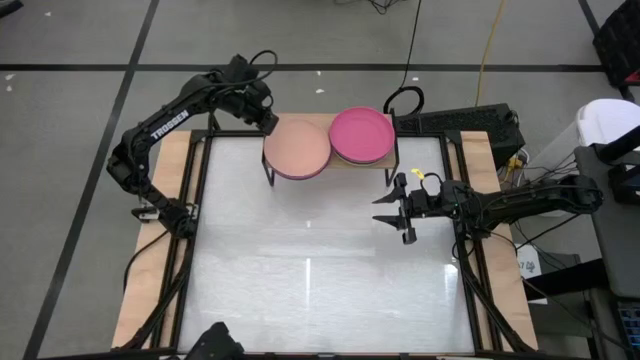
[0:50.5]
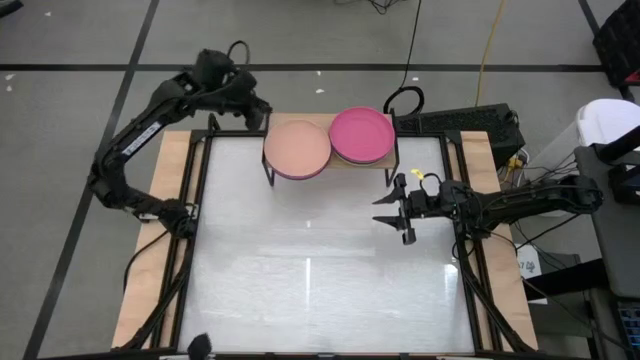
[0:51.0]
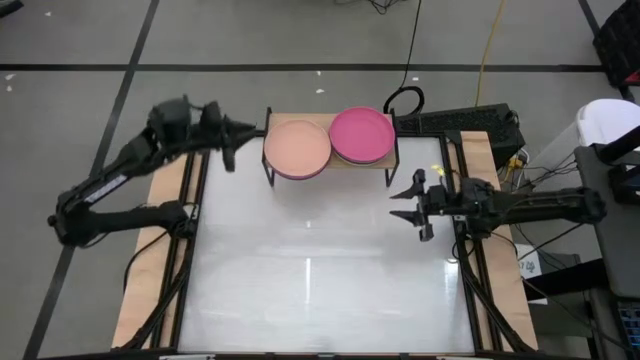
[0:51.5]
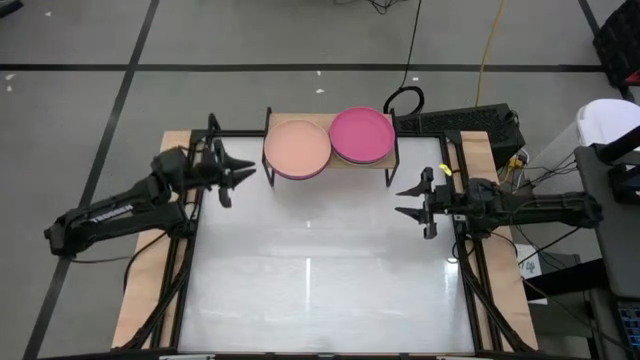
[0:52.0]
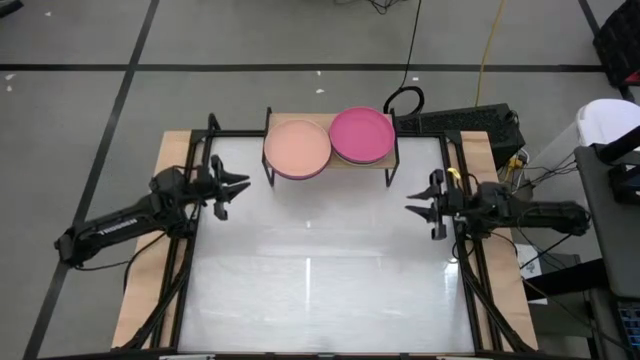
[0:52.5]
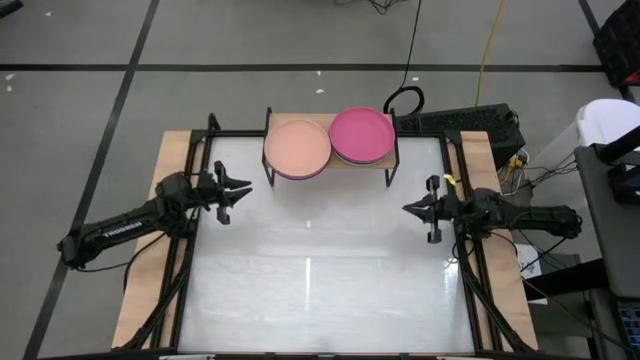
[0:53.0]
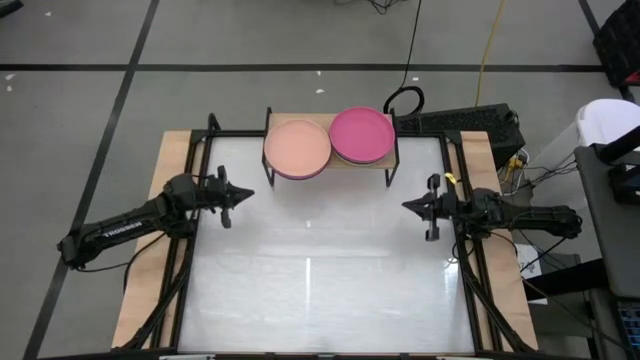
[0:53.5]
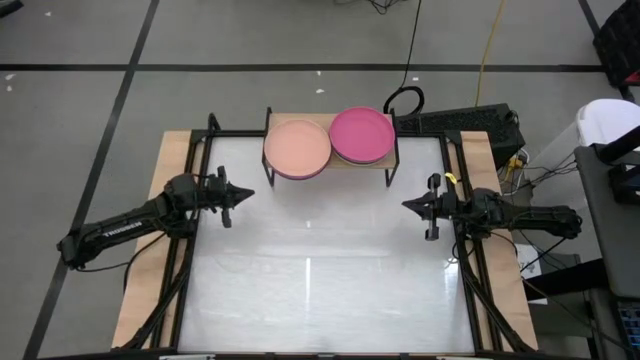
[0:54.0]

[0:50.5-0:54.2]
Task: Place and stack plates onto a shelf
Return to Home Position

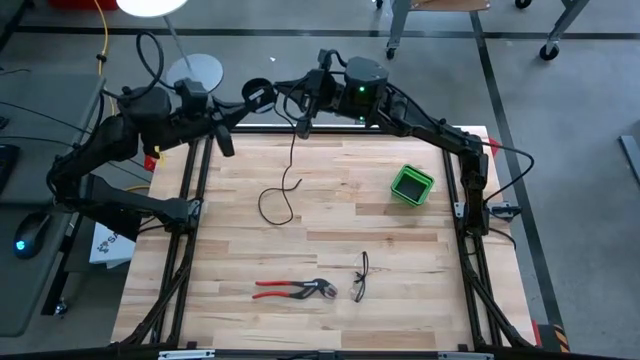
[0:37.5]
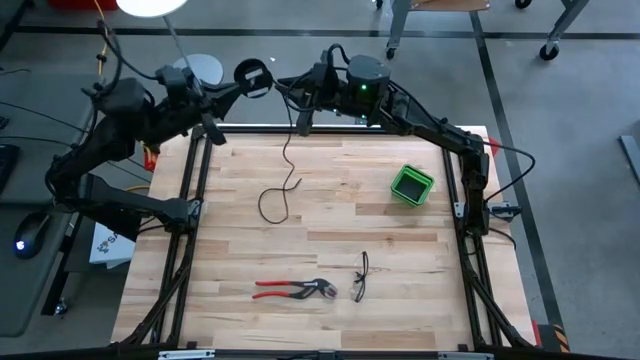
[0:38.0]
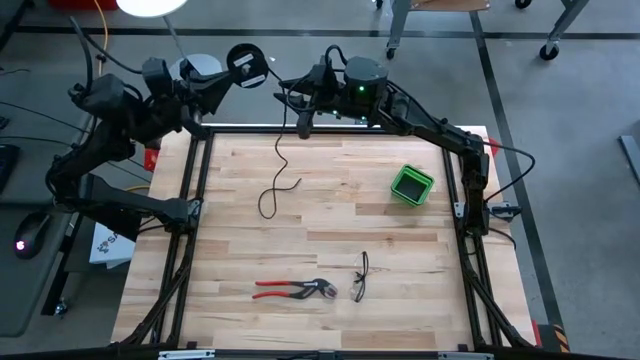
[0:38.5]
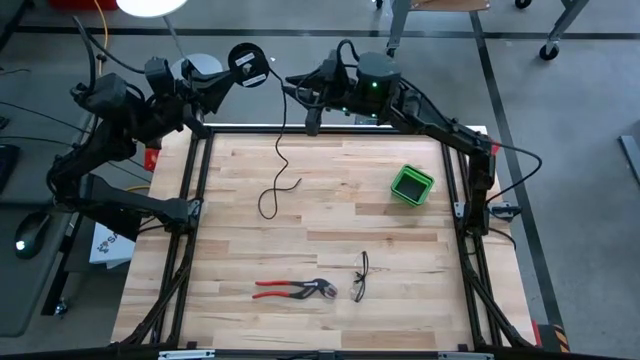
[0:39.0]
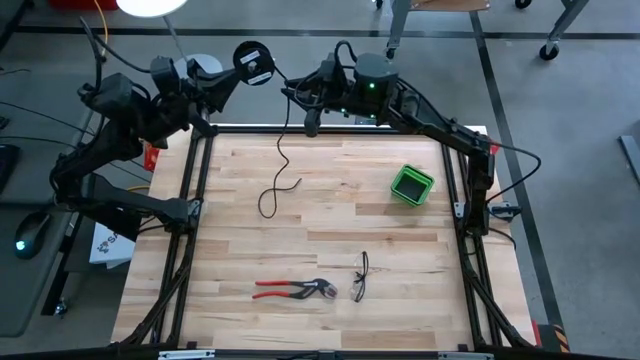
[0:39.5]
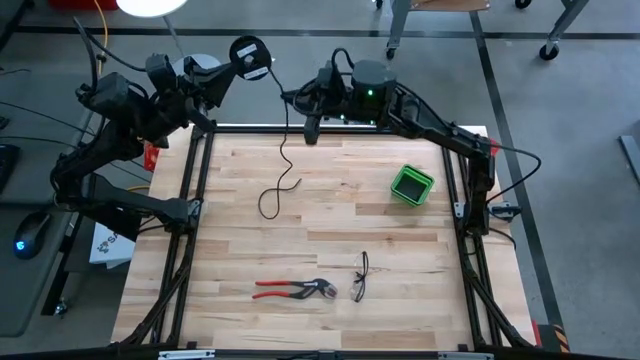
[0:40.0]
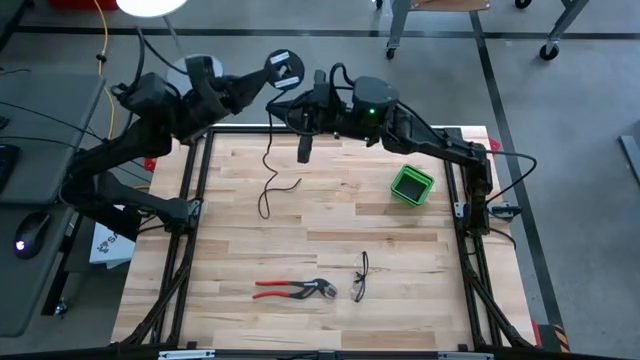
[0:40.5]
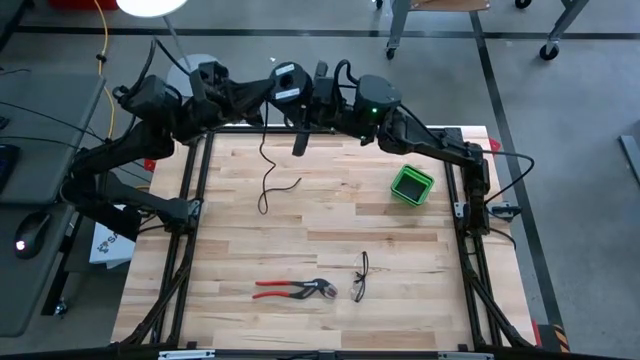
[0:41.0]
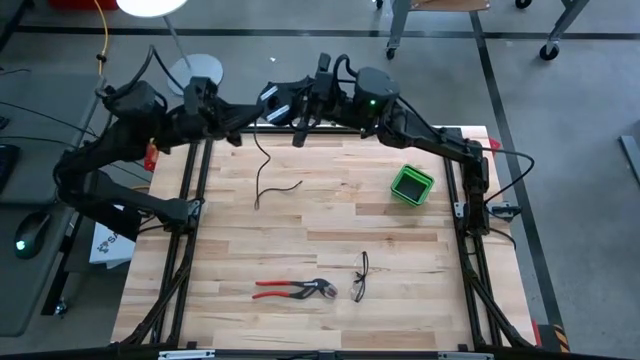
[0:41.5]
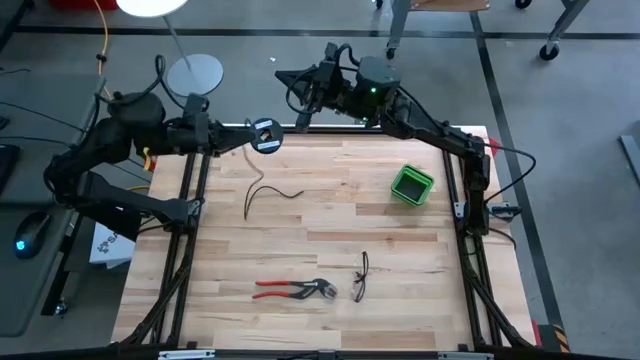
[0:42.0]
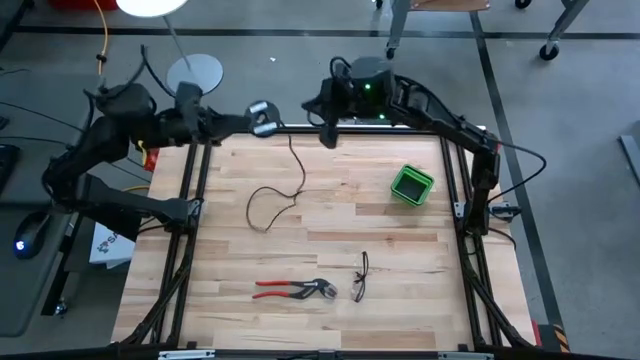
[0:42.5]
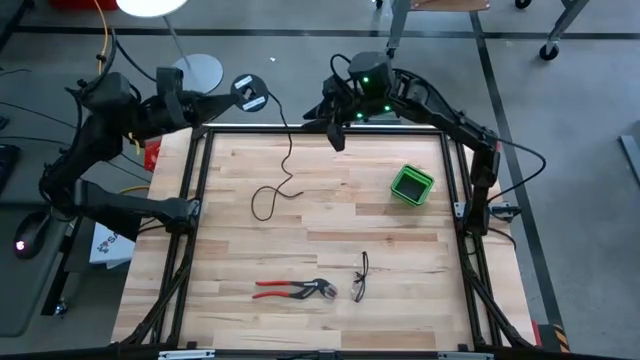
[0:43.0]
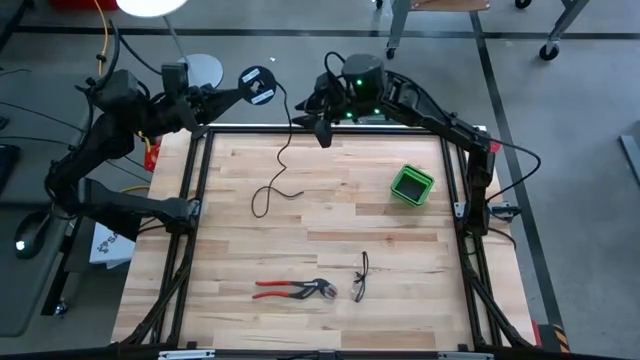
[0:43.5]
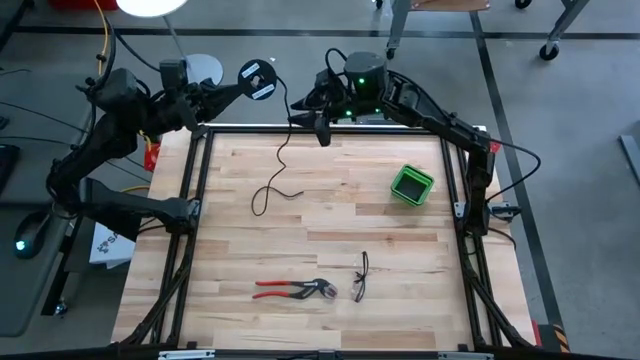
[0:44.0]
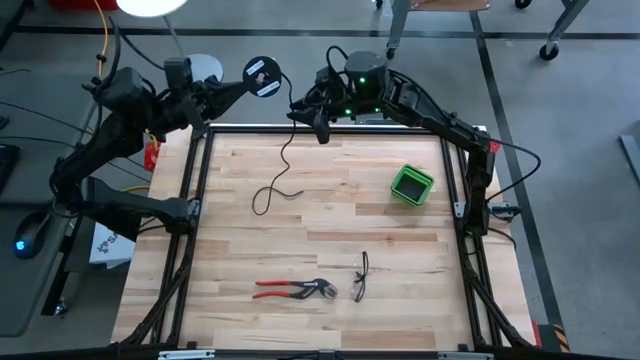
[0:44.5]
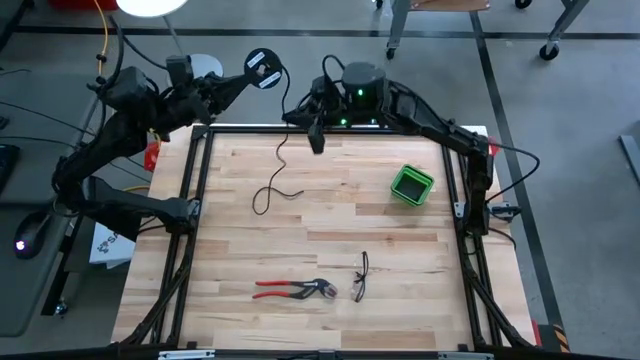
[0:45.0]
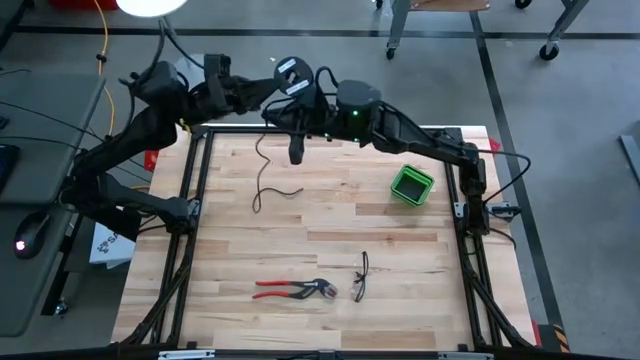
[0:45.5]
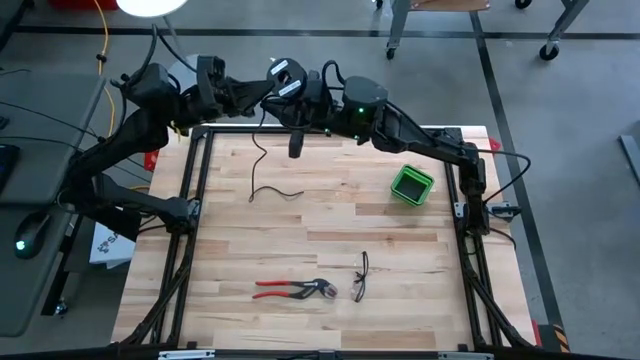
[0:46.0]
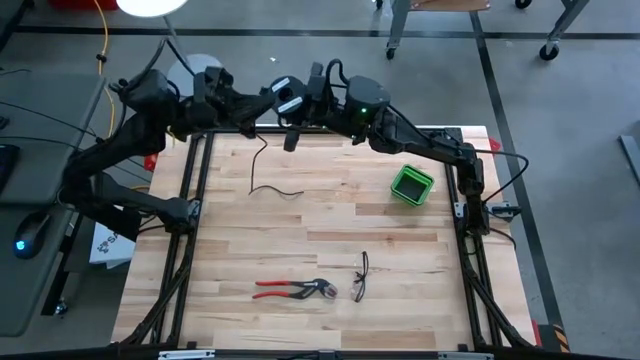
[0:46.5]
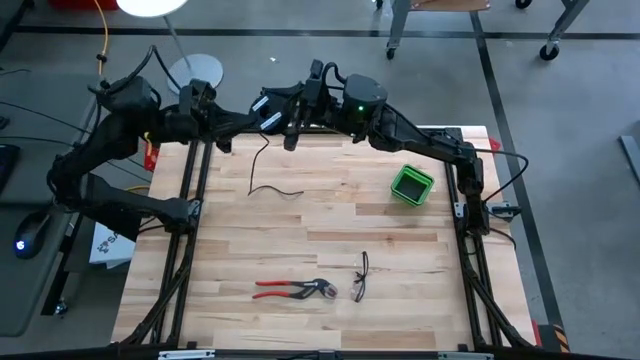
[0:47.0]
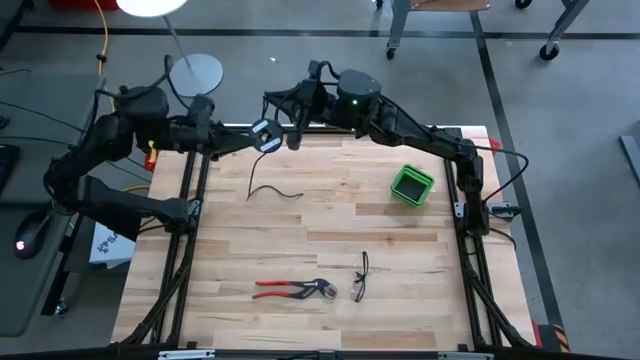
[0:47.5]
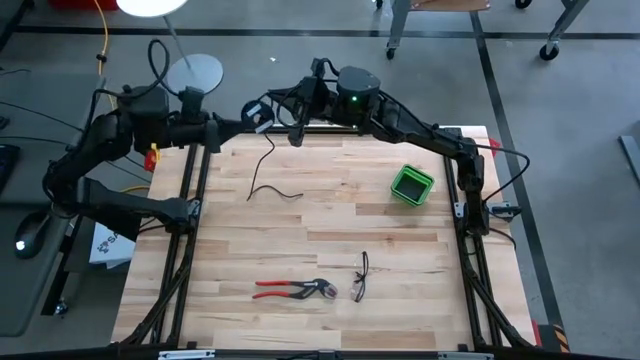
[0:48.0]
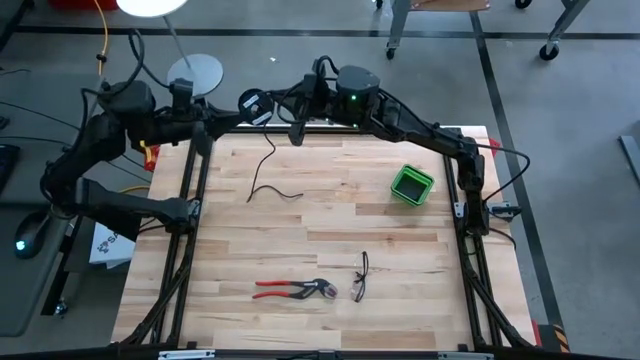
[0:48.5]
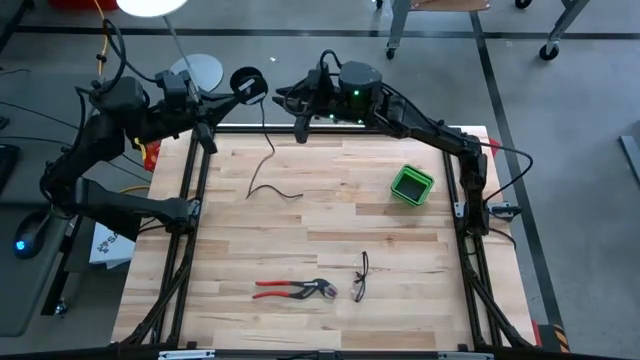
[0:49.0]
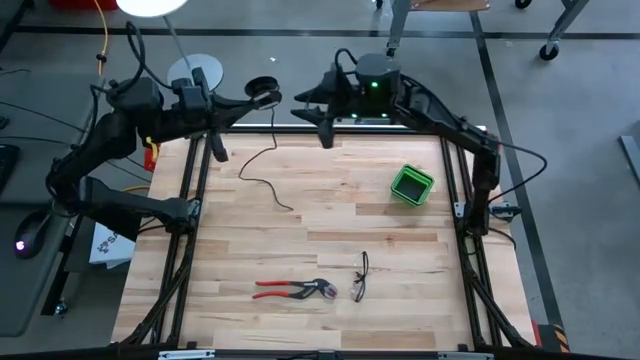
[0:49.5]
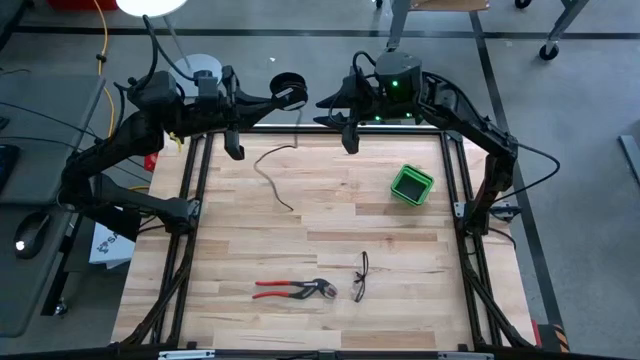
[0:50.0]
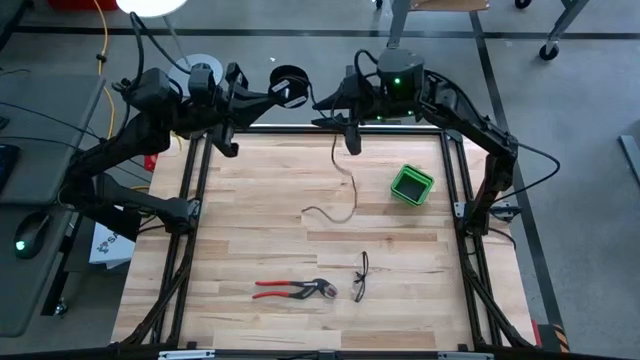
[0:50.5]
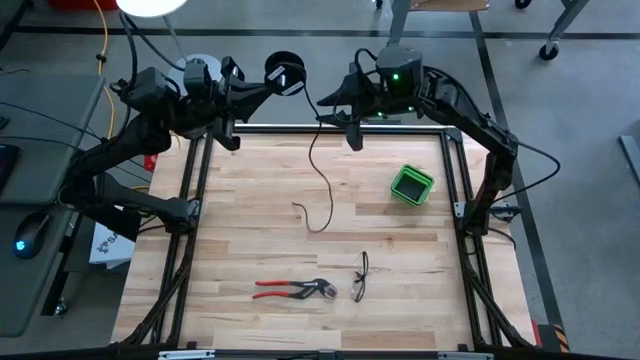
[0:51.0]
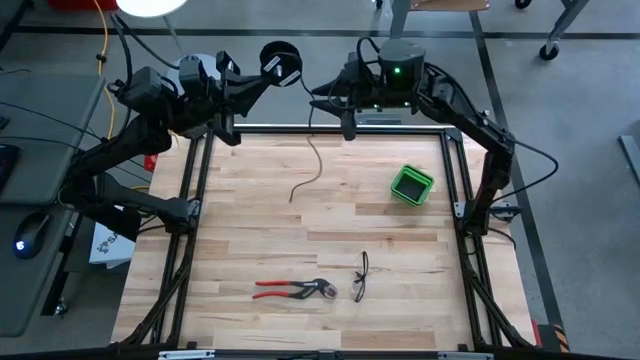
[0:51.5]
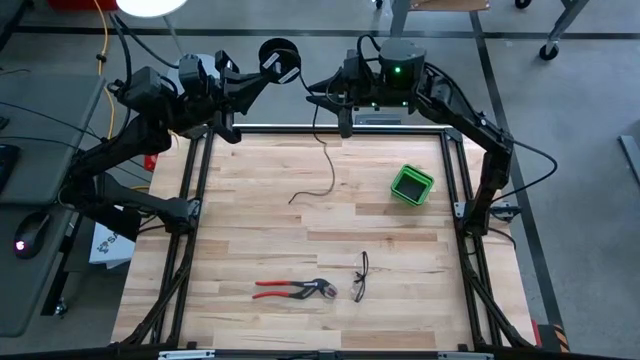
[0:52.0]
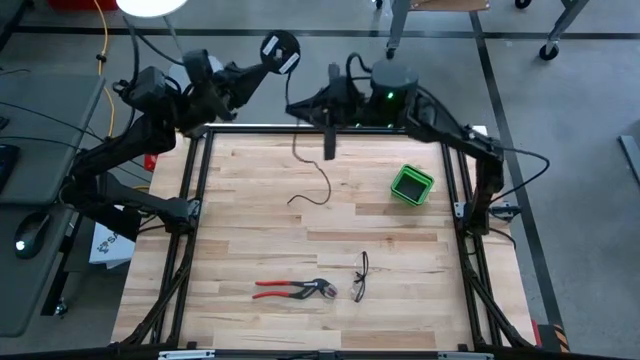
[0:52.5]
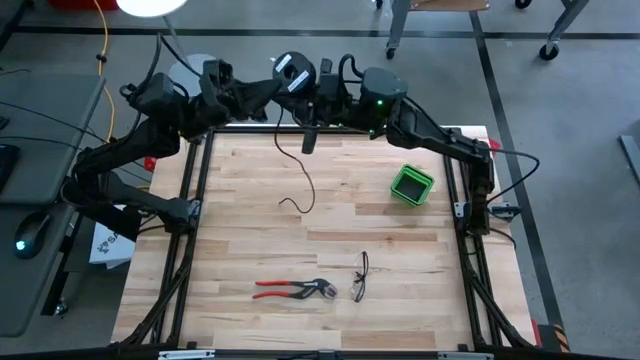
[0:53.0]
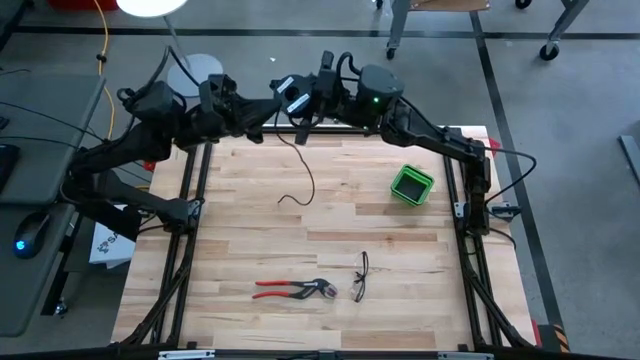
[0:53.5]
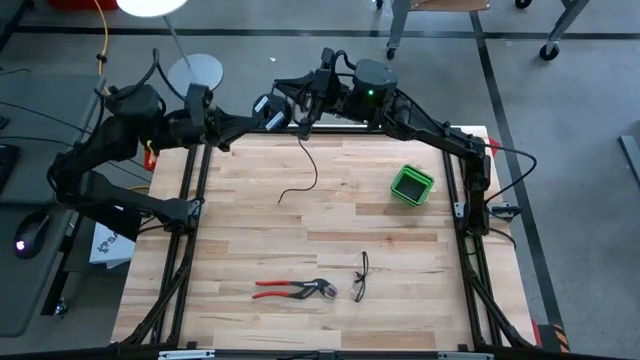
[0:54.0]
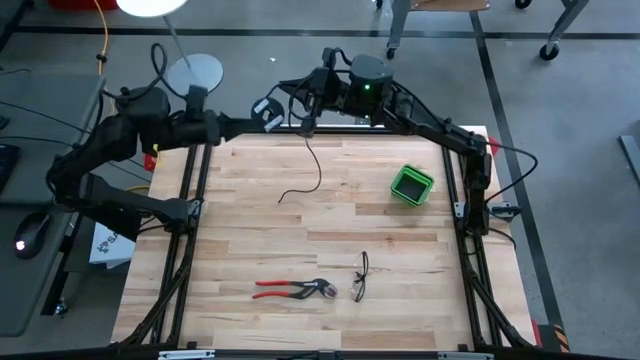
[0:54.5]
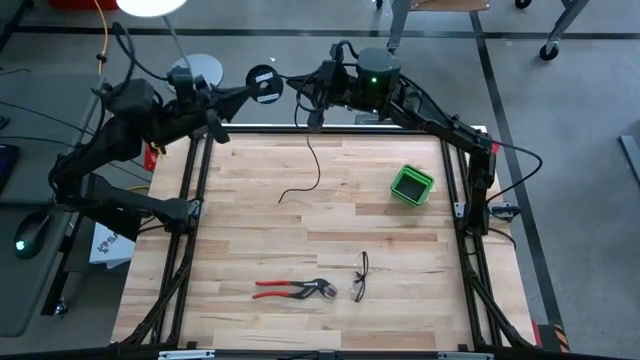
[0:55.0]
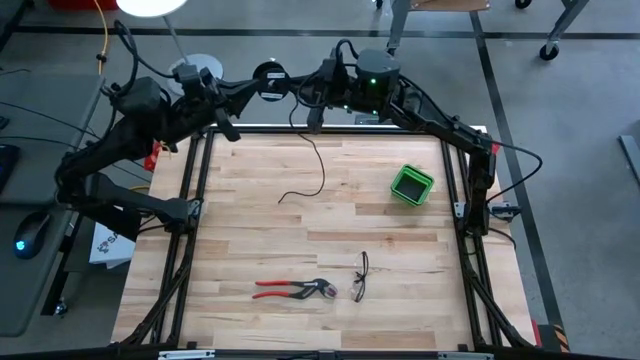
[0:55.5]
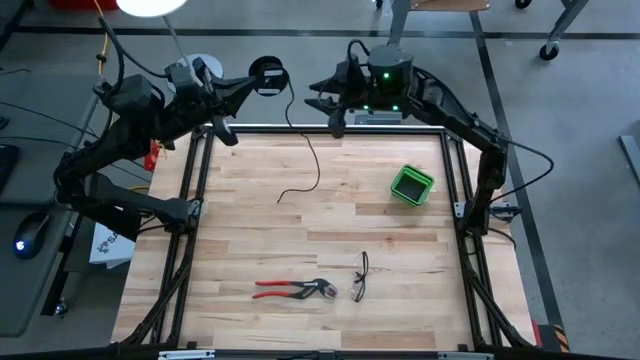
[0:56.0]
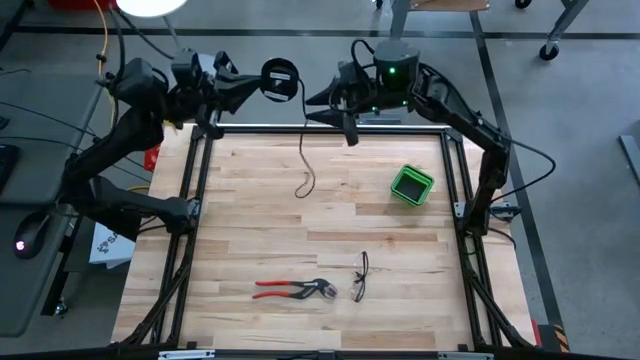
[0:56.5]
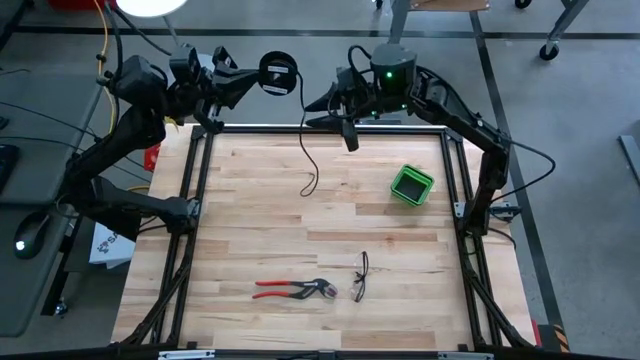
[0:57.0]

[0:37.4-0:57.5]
Task: Coil cords
Coil the black wire onto the black spool
